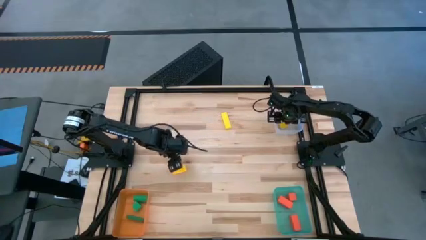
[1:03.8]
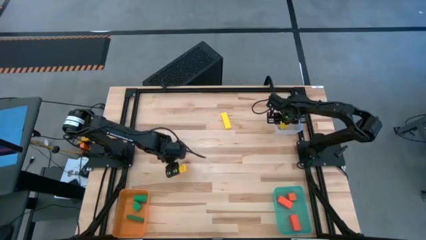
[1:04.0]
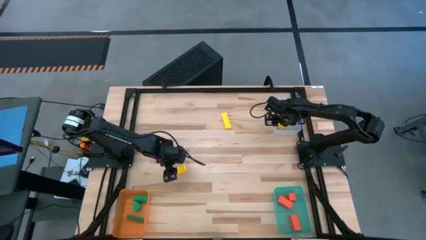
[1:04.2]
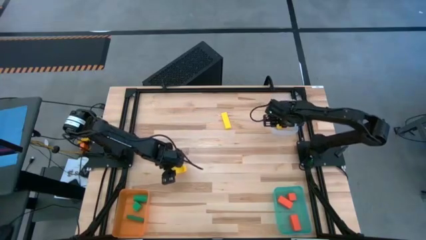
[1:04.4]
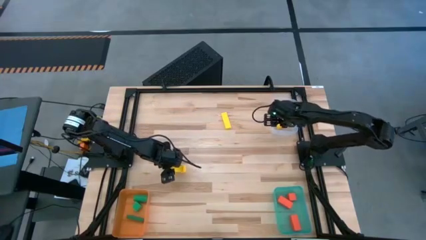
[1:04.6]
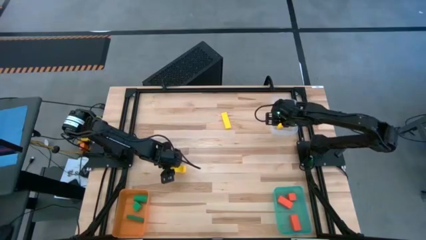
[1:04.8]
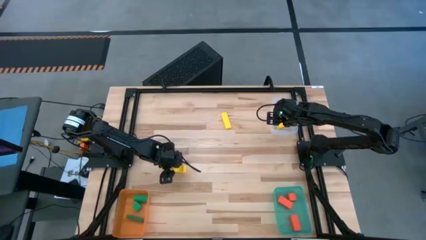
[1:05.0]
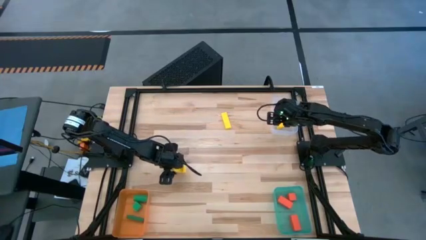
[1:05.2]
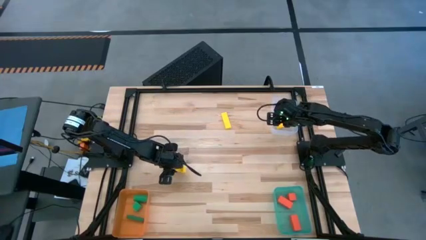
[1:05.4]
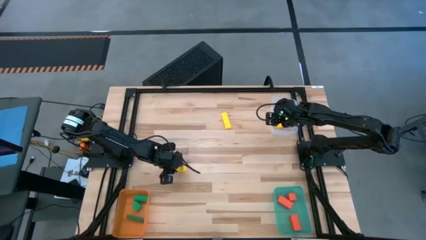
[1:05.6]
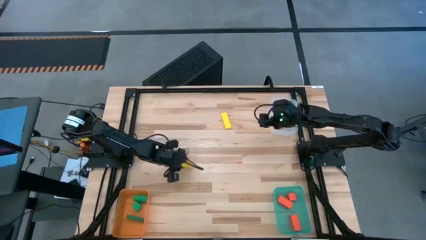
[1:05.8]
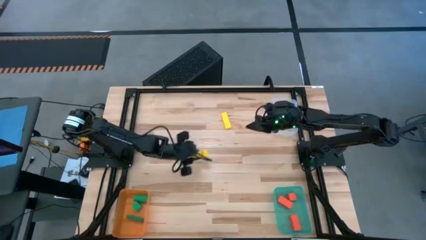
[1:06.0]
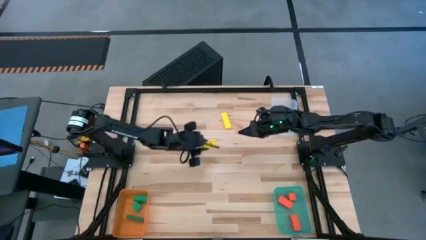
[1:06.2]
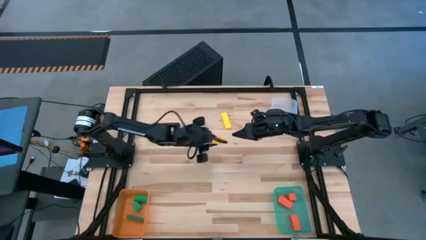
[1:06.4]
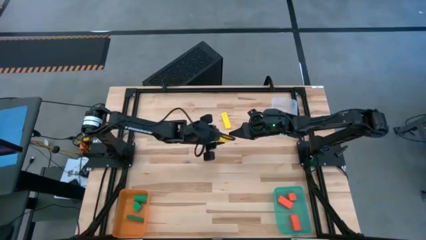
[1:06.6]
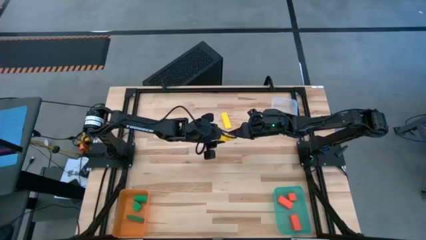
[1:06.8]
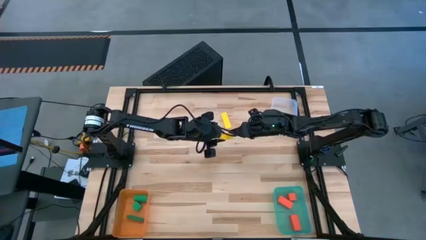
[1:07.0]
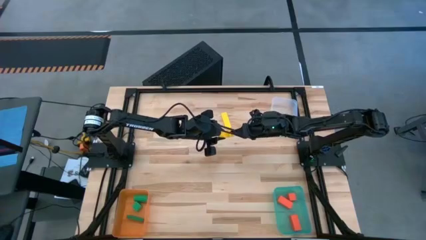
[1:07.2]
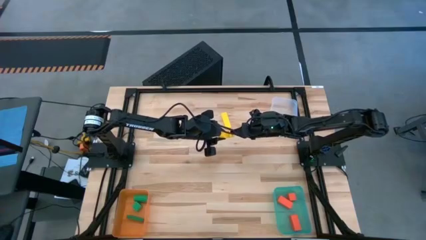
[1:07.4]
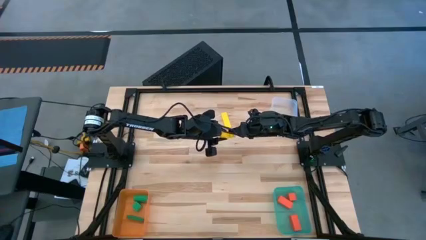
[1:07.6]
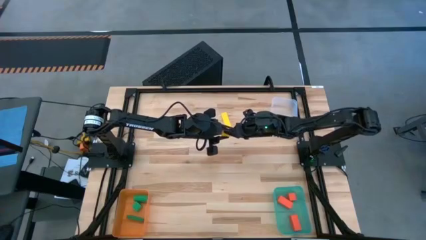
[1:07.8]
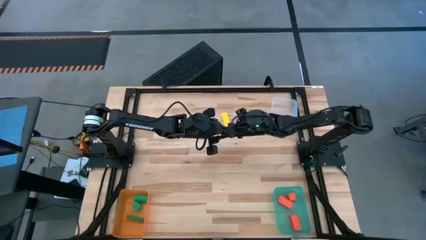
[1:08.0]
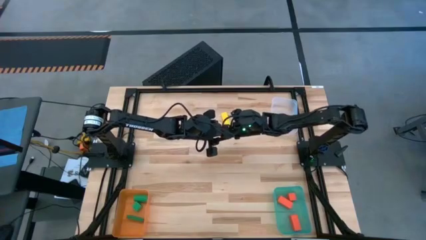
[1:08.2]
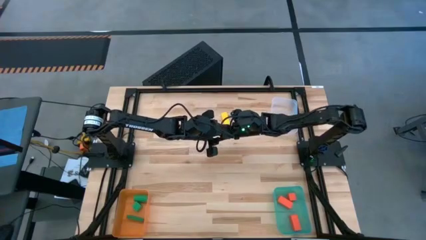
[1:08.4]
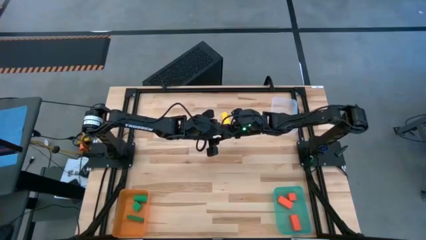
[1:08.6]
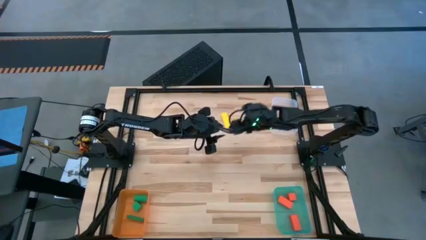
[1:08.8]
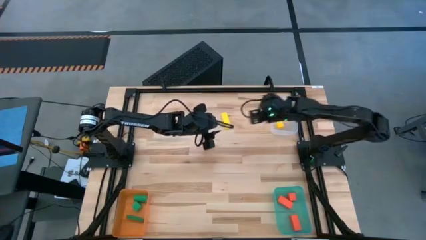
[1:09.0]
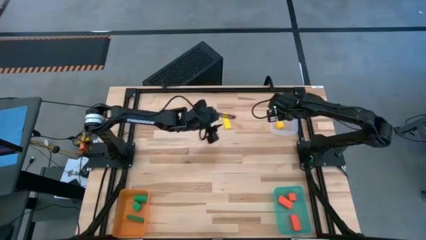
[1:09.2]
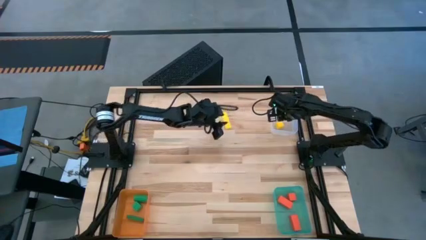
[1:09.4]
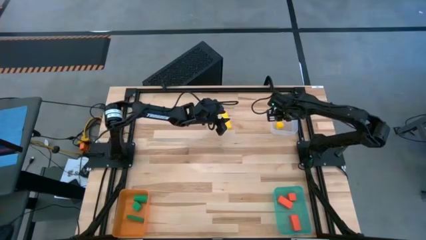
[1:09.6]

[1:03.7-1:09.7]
Task: Sort & place blocks by color
Put the bottom yellow block into the transparent bin

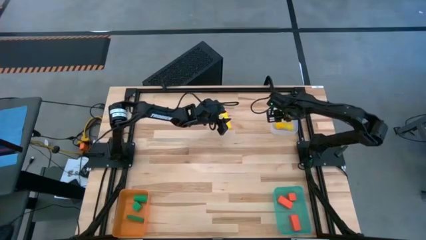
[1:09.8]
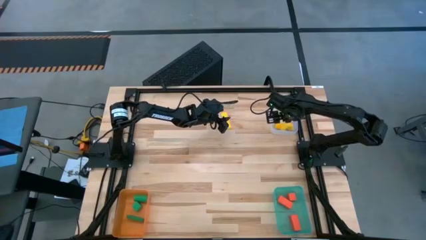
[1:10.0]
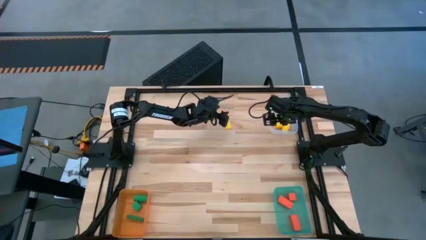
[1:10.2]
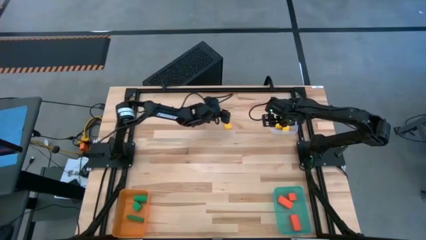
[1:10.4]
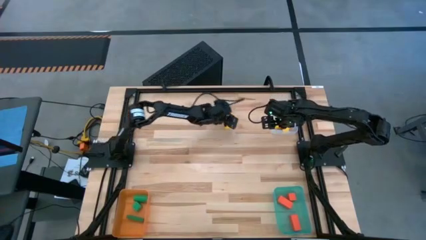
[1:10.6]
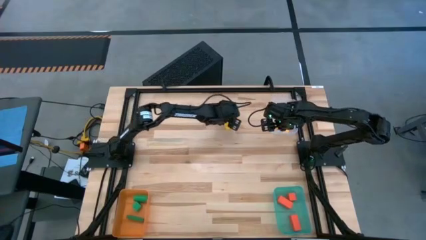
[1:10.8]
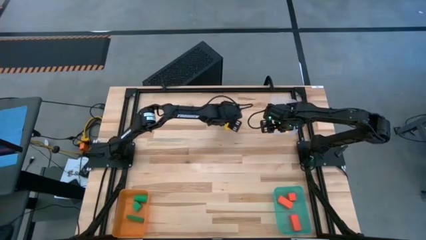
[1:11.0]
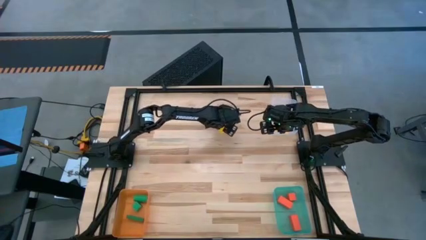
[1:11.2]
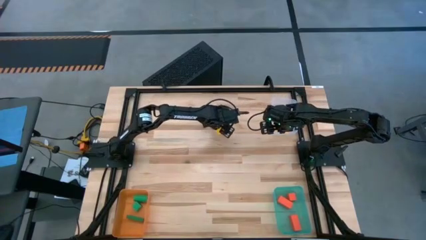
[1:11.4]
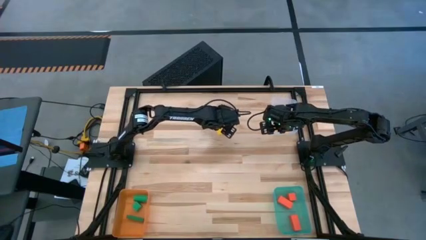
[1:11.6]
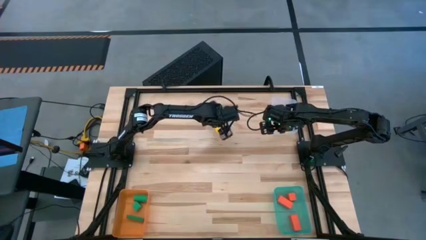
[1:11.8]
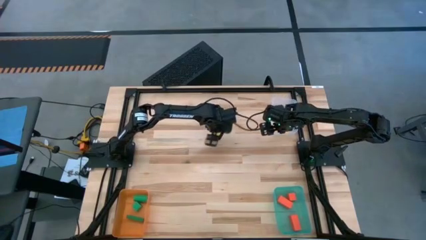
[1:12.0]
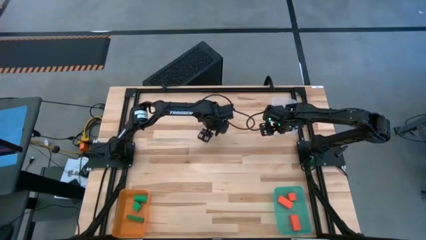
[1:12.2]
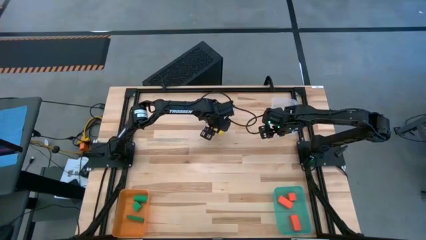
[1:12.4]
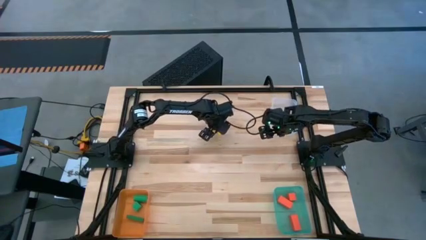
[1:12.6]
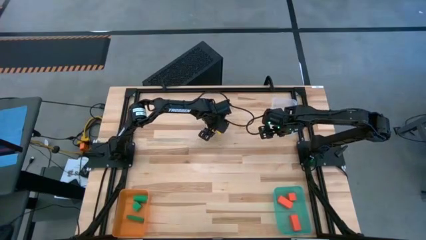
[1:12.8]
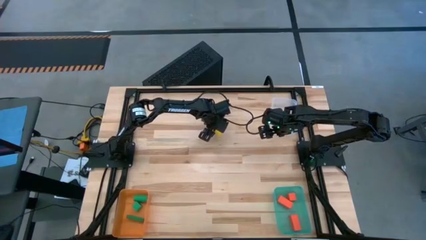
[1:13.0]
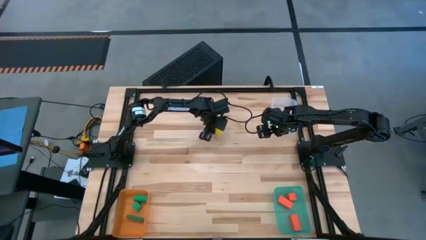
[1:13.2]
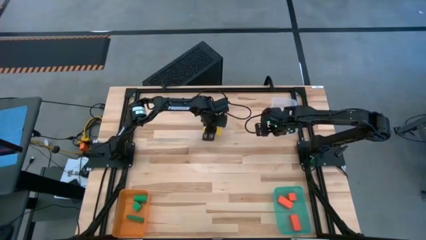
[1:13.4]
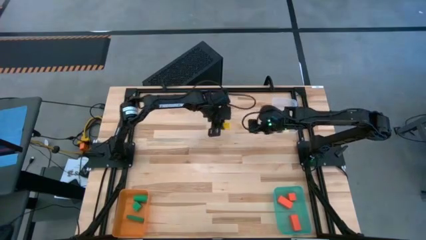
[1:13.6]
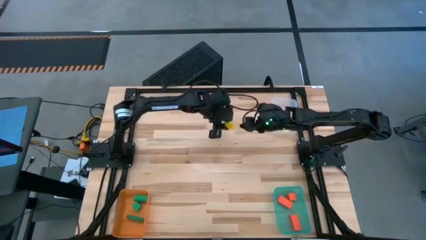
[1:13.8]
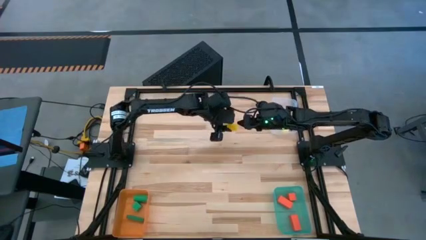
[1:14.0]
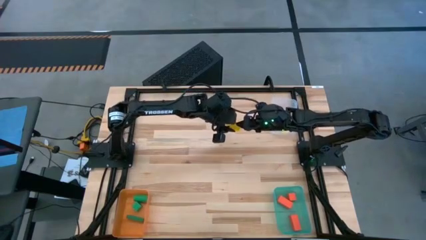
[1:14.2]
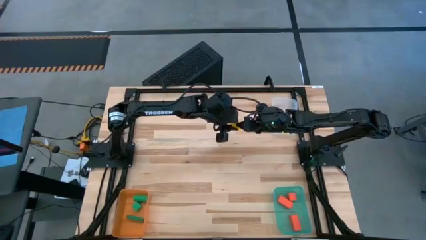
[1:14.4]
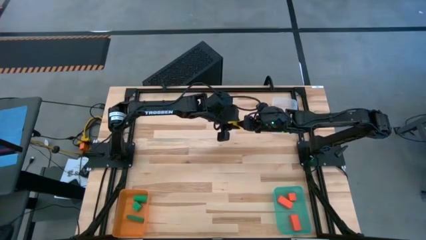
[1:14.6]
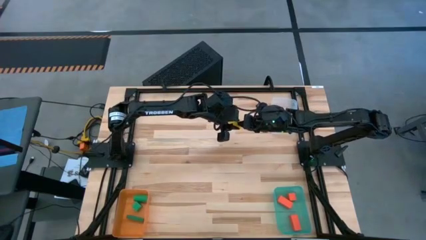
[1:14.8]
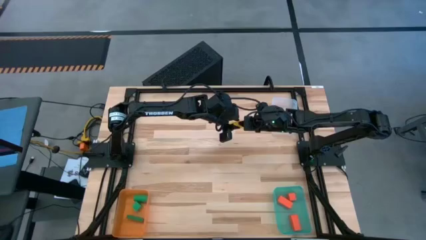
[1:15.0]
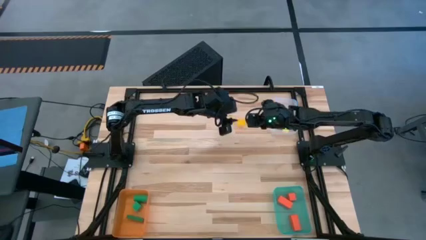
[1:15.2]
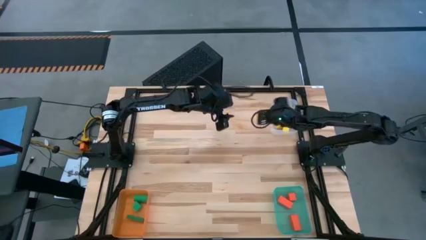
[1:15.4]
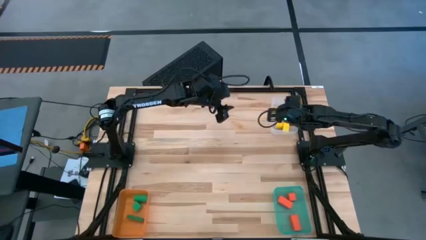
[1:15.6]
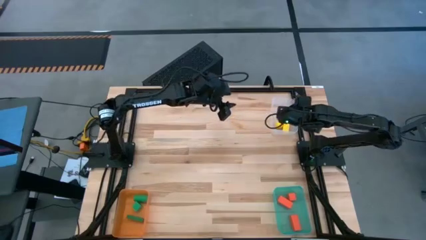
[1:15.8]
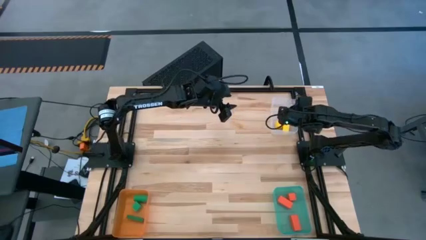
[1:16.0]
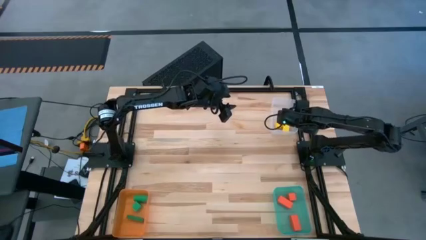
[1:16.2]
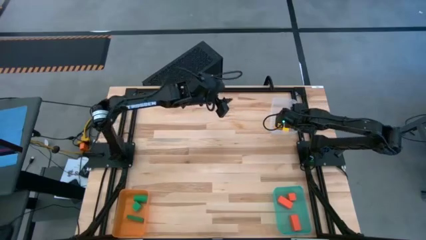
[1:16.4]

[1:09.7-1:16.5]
Put the yellow block into the transparent bin
